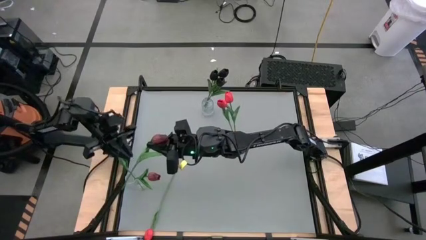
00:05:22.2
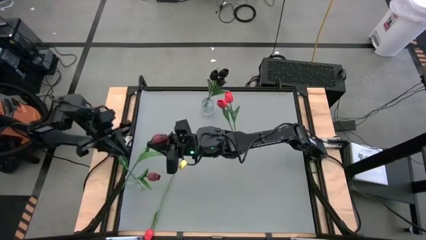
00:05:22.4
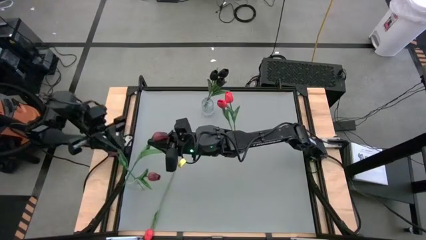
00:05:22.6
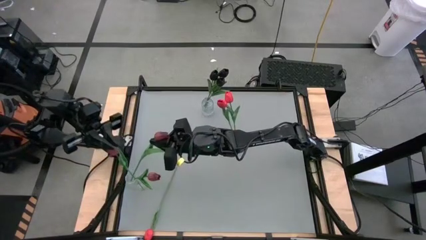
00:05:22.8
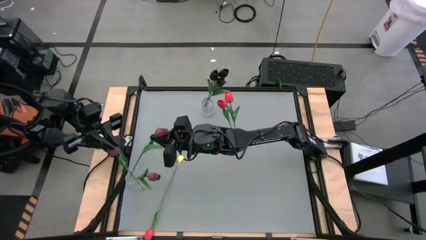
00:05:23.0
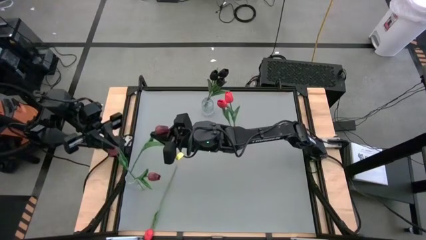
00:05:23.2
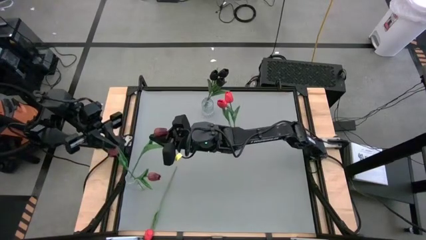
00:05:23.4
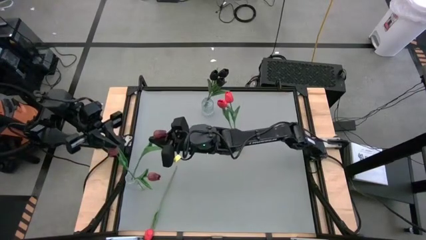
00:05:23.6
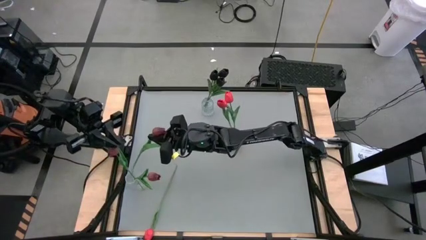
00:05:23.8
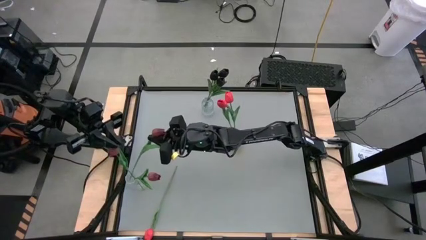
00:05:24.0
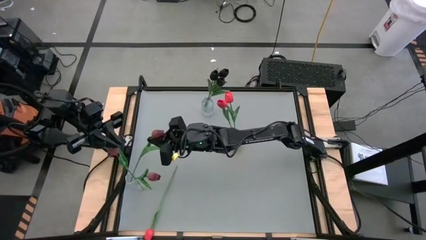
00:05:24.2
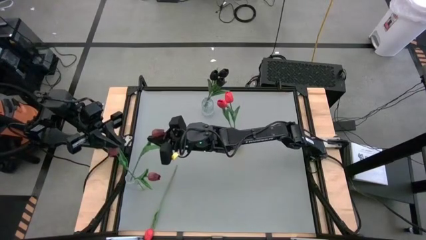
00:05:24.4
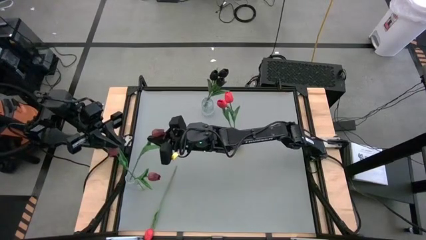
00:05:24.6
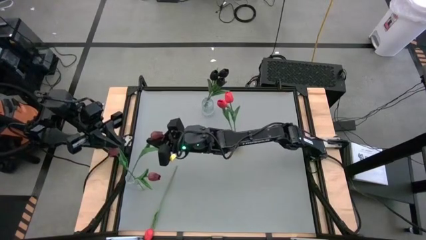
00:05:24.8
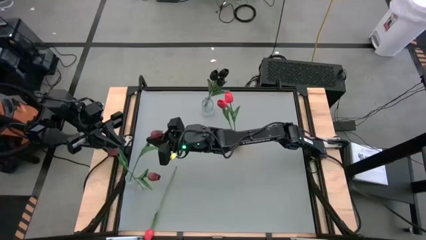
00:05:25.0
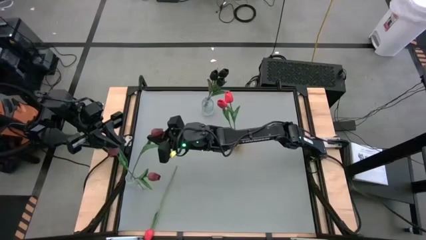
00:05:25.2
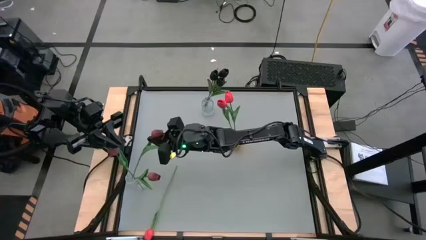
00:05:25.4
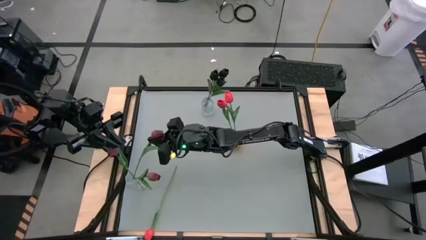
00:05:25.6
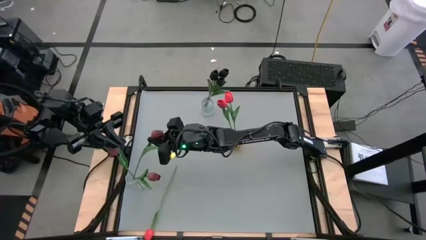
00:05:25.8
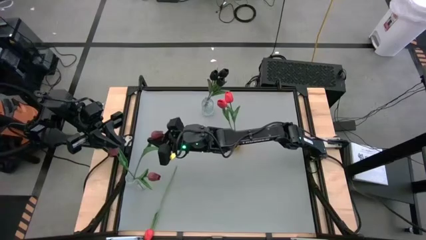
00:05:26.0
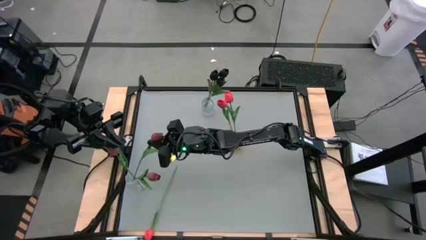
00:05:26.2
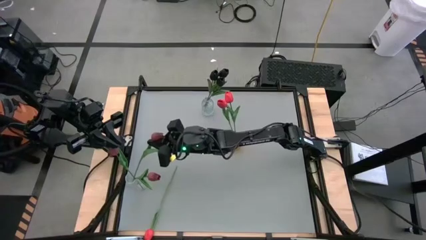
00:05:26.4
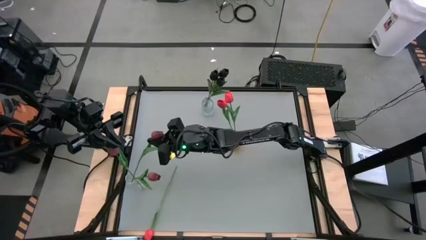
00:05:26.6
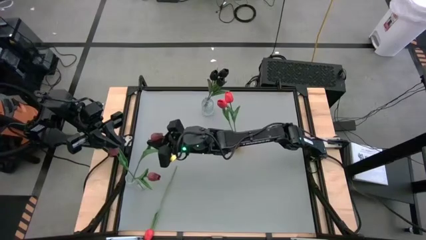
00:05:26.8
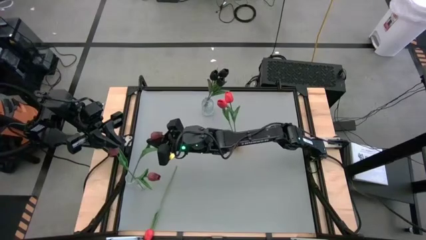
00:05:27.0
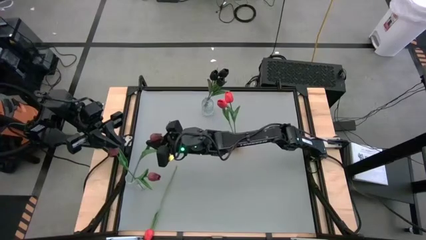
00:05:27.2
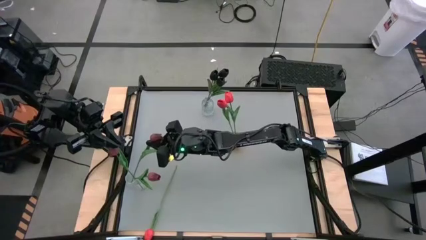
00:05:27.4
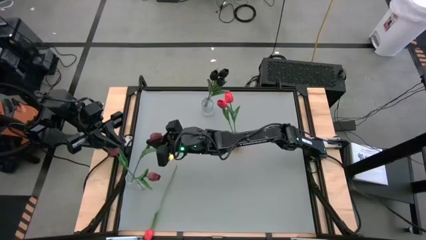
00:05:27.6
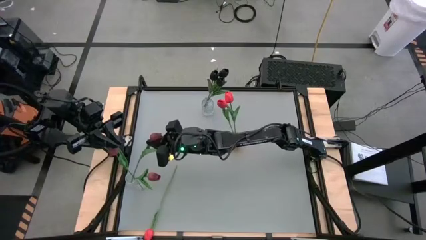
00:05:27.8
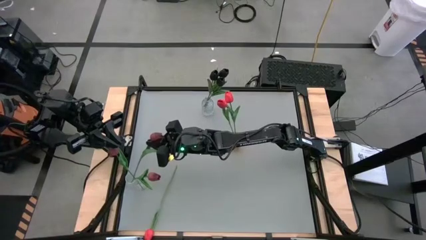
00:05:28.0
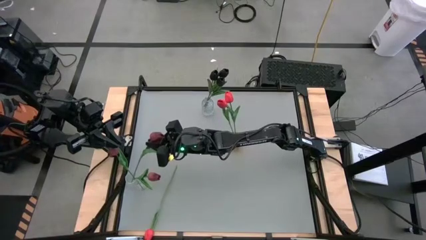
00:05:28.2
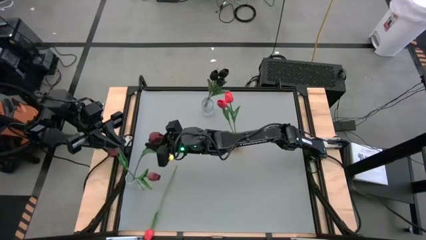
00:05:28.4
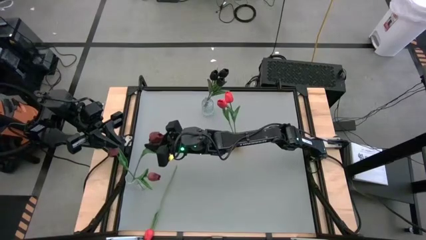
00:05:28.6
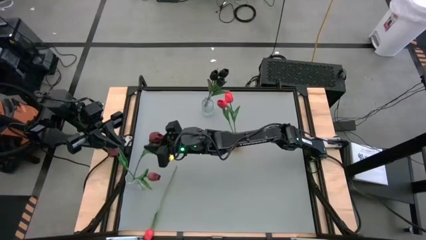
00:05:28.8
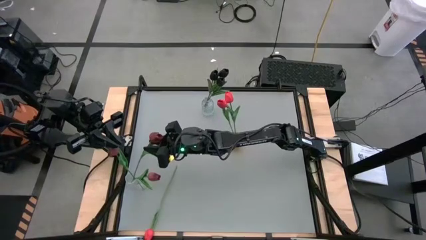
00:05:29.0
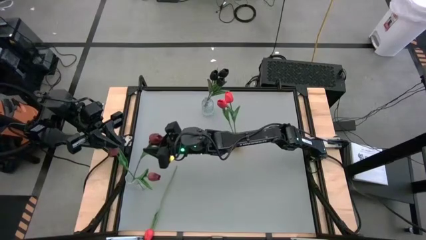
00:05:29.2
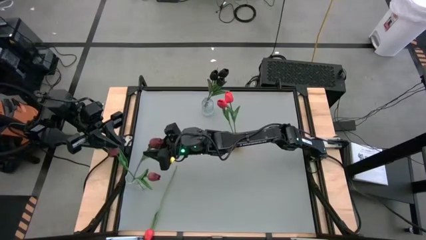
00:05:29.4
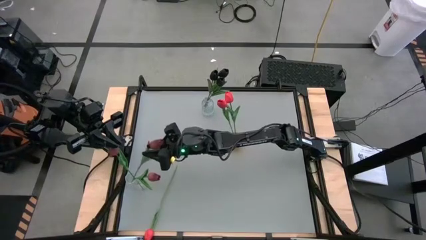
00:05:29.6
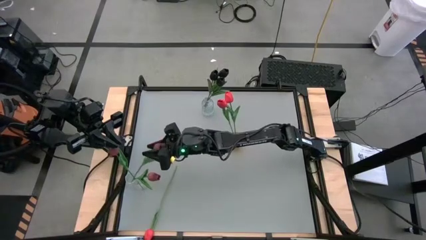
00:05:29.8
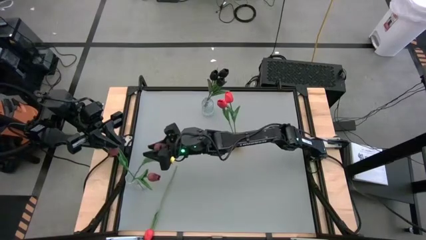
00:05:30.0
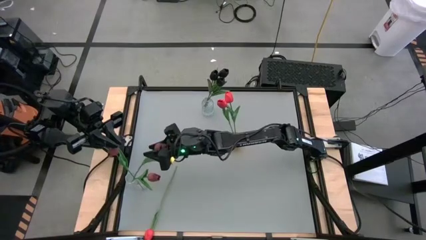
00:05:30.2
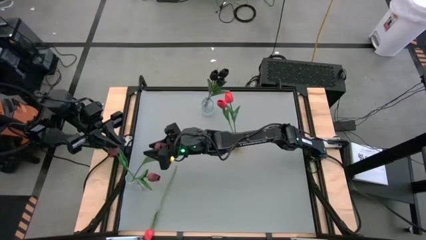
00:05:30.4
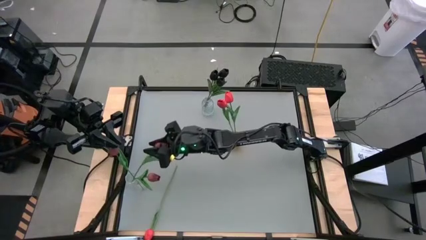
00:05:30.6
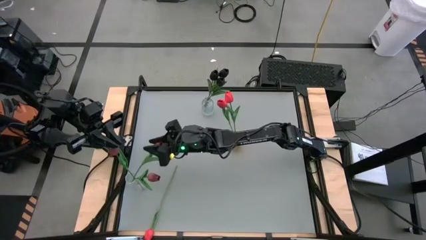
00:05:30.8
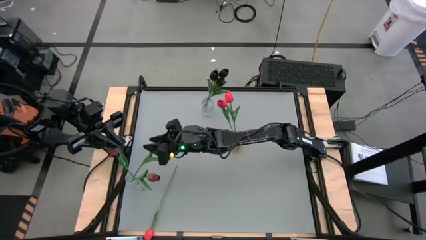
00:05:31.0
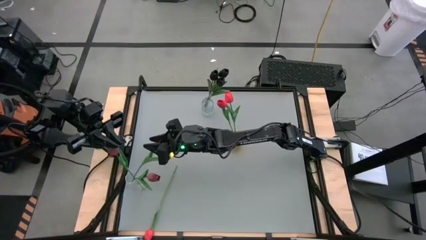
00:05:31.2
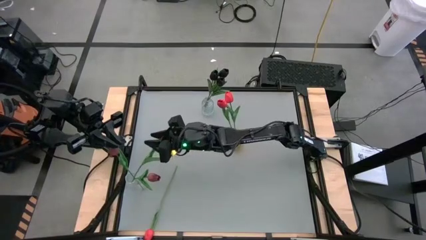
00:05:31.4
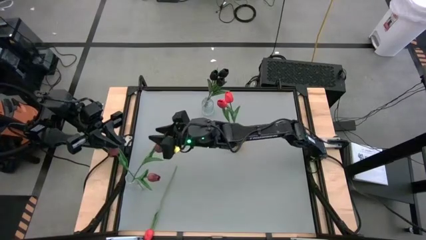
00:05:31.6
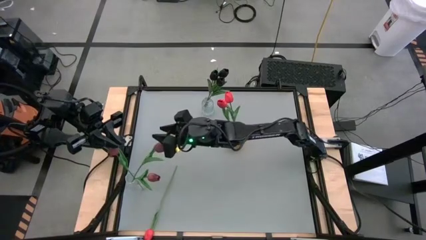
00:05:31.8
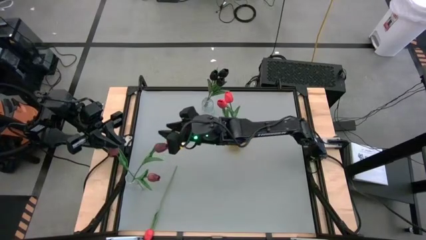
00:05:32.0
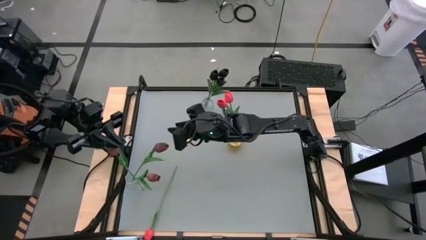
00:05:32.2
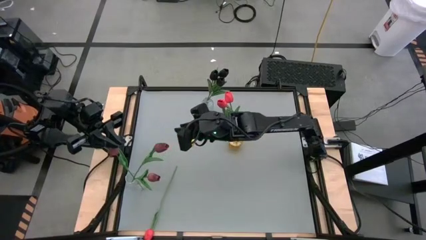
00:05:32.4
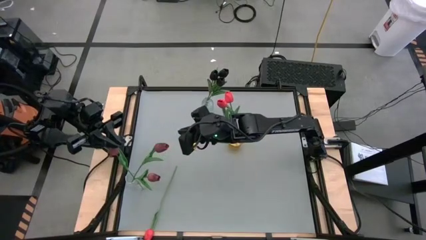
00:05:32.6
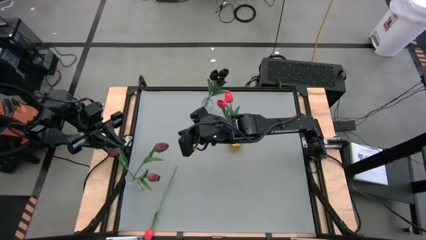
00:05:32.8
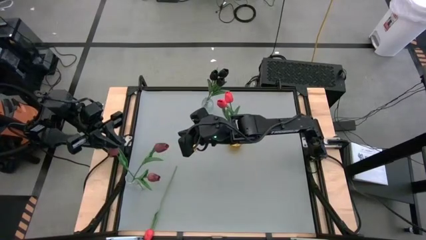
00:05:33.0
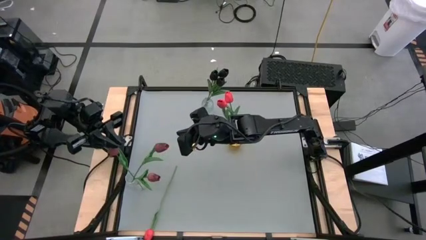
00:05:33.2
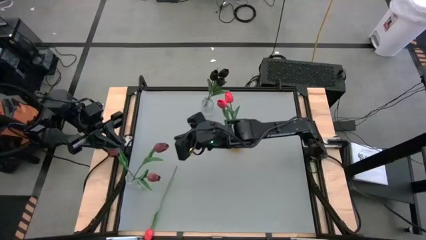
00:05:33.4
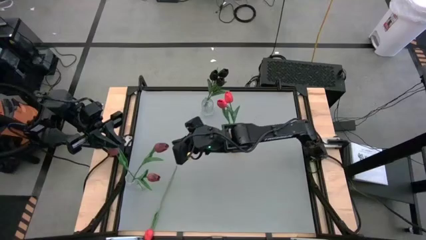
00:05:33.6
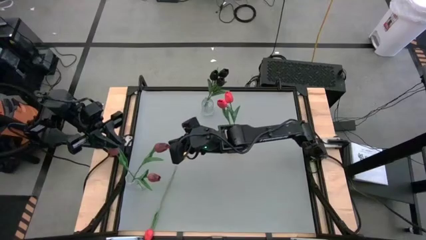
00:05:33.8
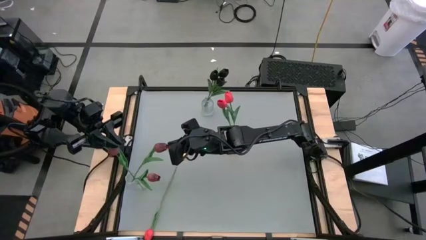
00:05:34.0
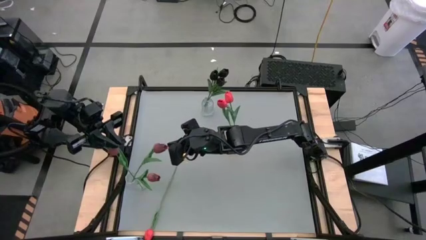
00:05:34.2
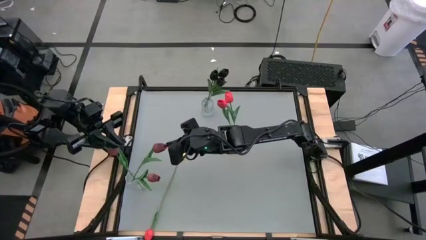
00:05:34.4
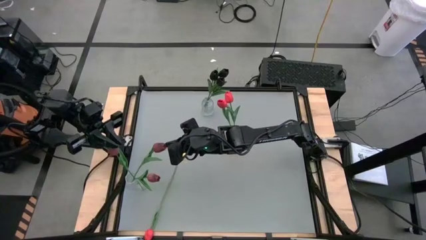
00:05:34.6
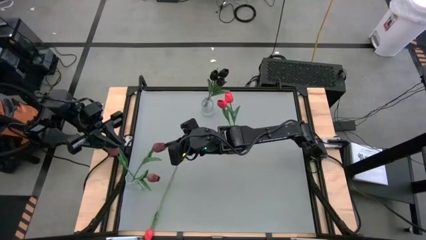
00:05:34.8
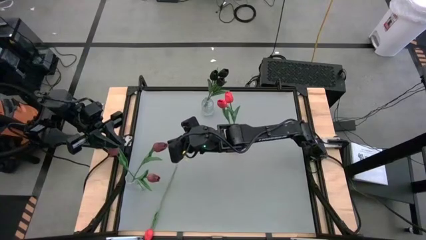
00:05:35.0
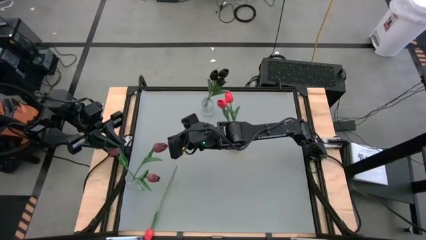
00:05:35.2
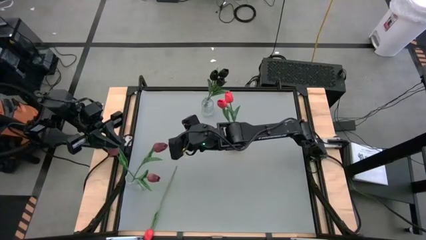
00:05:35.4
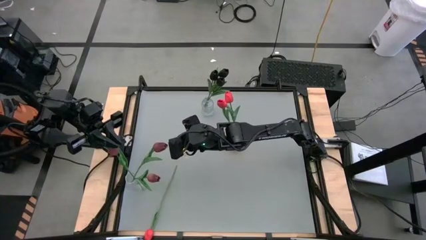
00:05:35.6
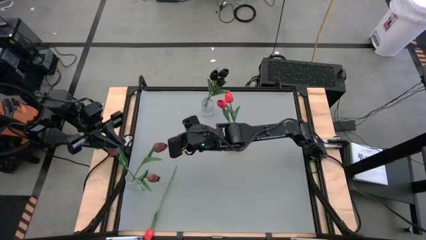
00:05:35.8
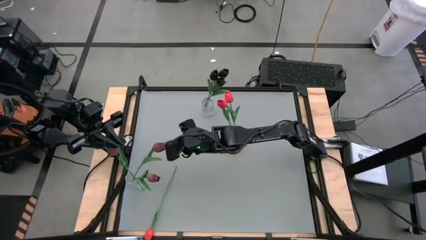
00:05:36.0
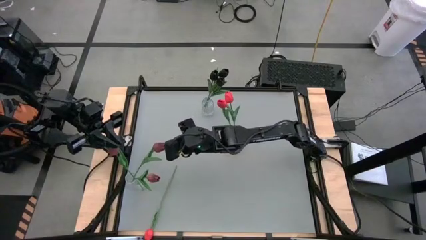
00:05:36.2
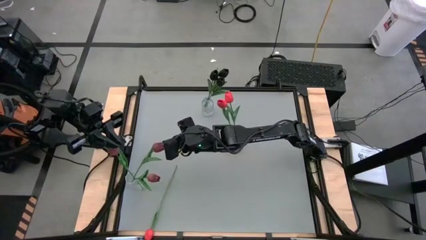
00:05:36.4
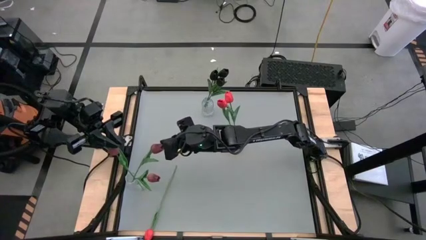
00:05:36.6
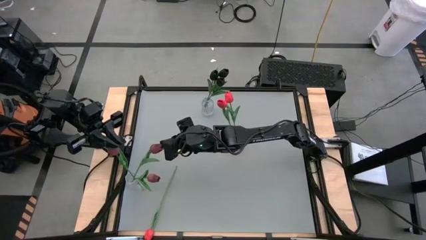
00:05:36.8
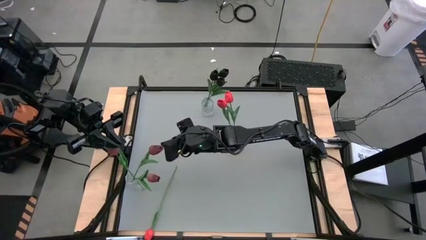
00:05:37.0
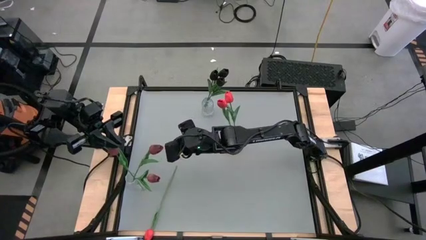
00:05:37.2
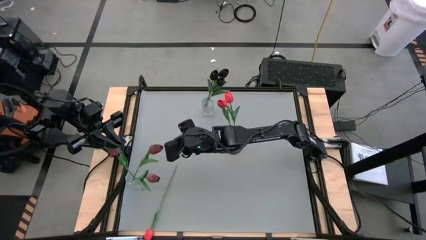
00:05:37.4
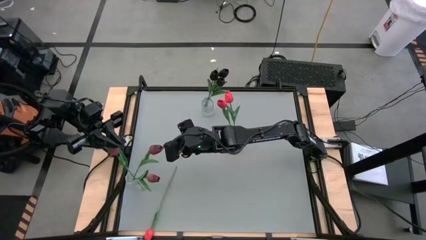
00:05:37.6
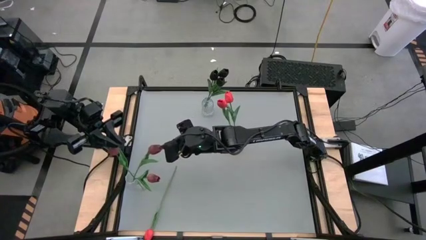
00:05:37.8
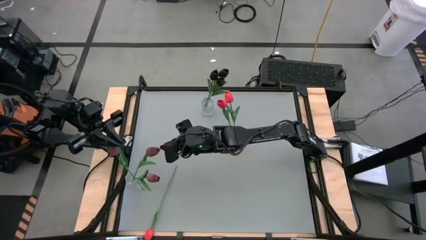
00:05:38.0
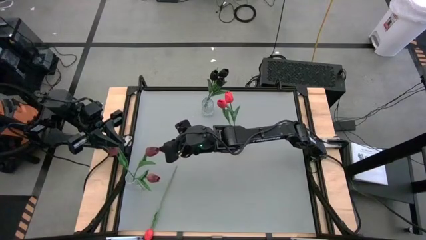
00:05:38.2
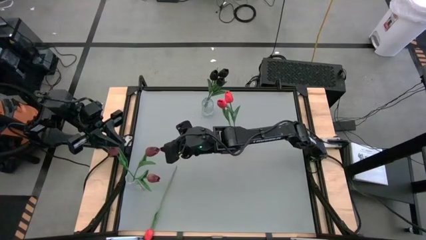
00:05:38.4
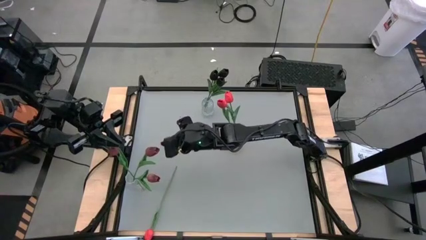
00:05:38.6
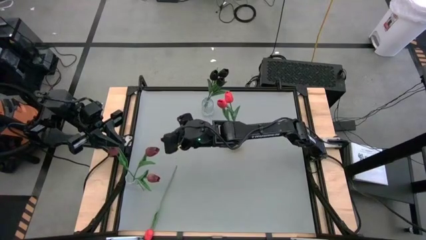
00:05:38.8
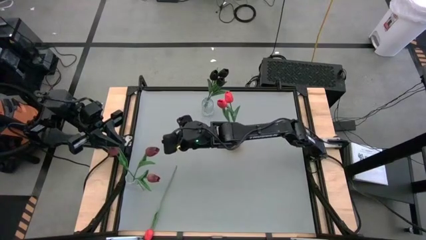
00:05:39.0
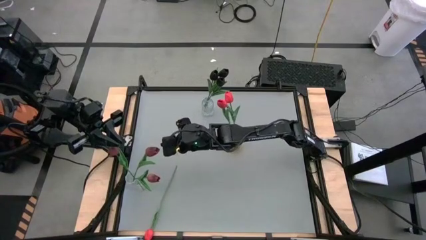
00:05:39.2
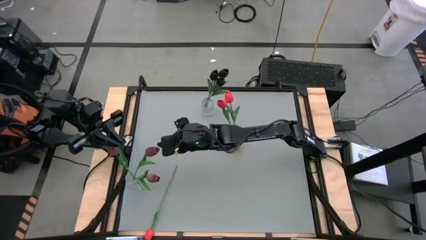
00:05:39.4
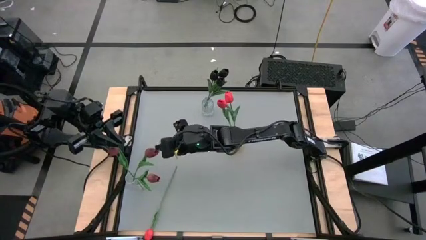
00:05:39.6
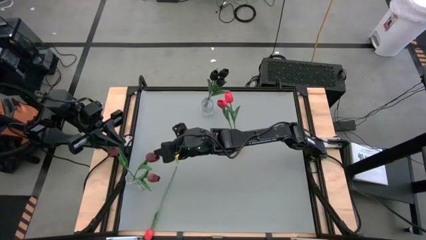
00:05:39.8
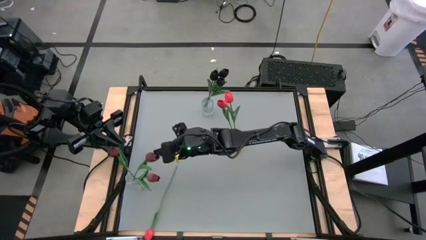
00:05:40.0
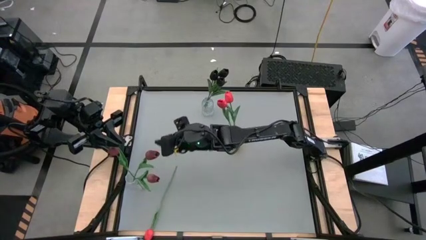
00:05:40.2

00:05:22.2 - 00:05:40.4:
Task: Sort flowers into vase by color
Put the red tulip into the bottom transparent bin
